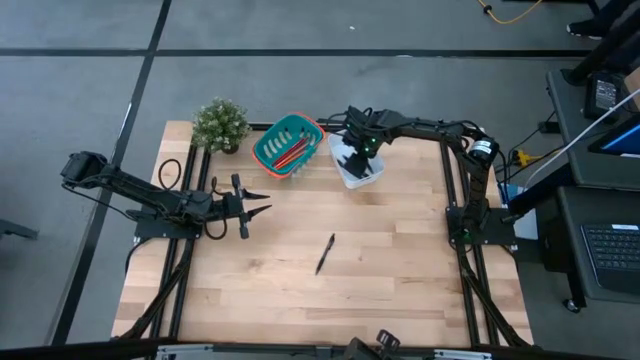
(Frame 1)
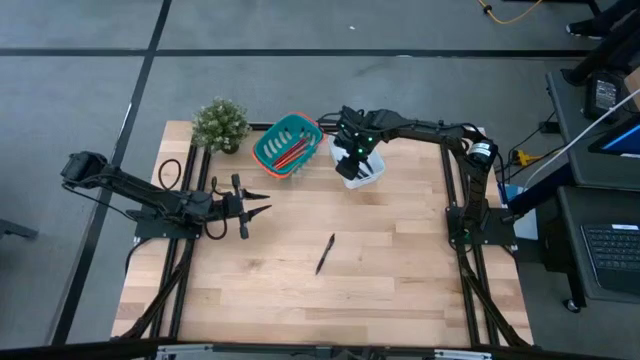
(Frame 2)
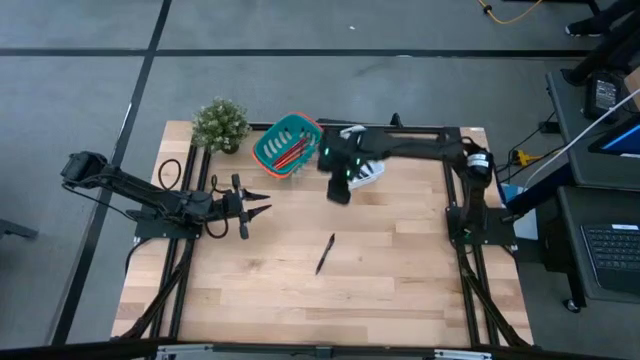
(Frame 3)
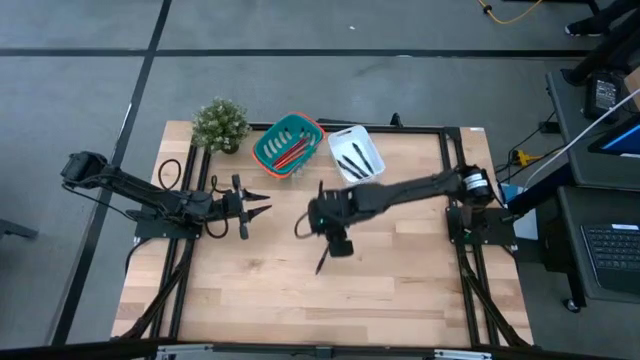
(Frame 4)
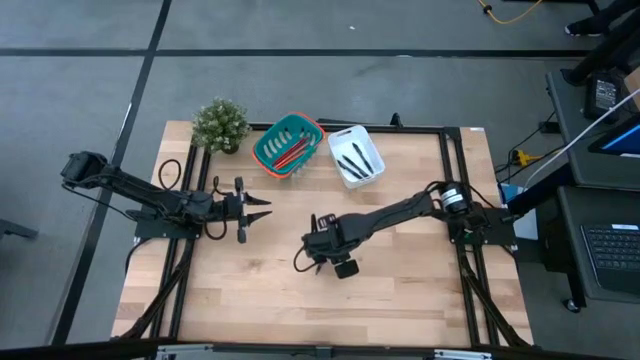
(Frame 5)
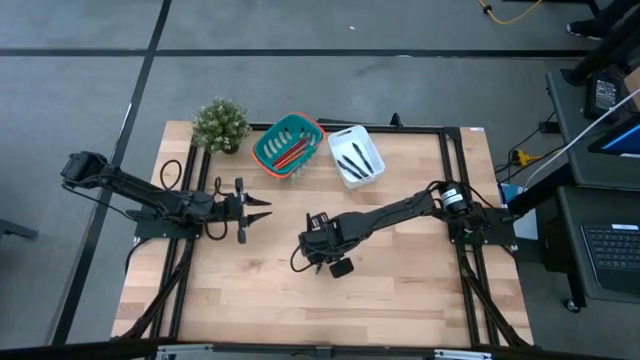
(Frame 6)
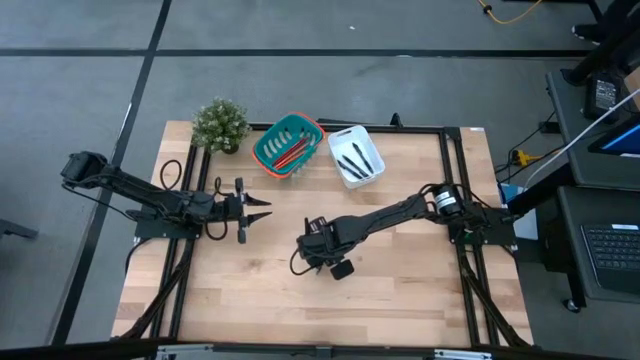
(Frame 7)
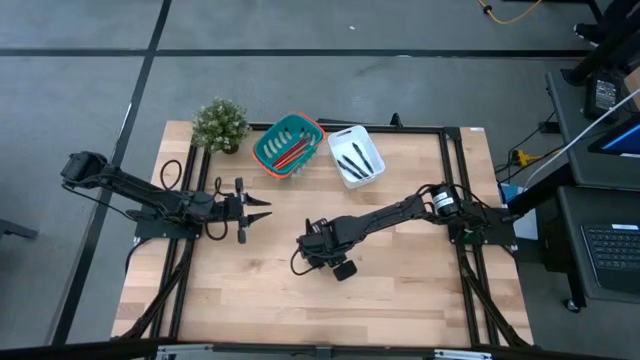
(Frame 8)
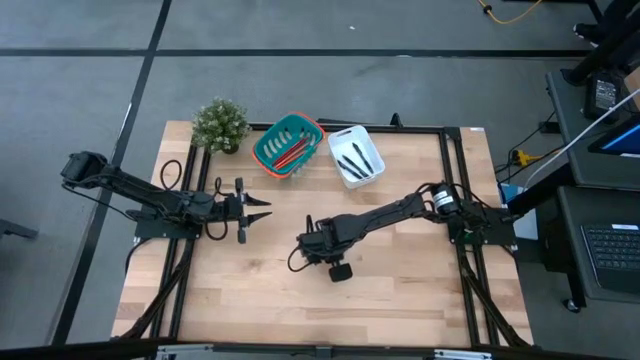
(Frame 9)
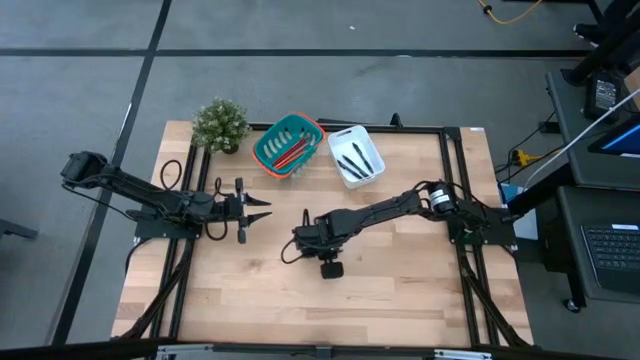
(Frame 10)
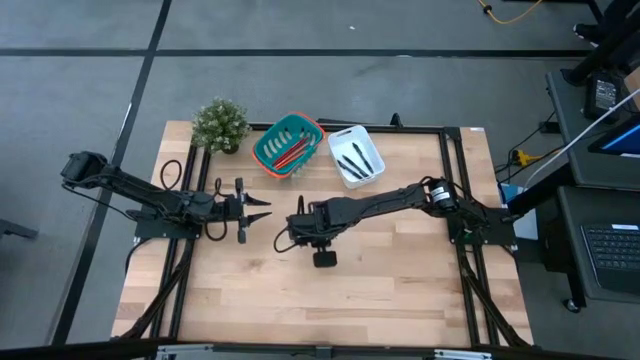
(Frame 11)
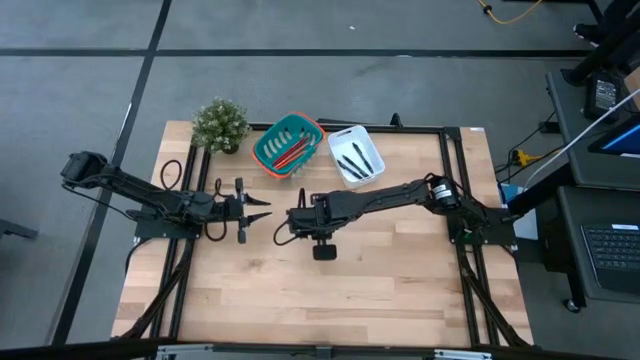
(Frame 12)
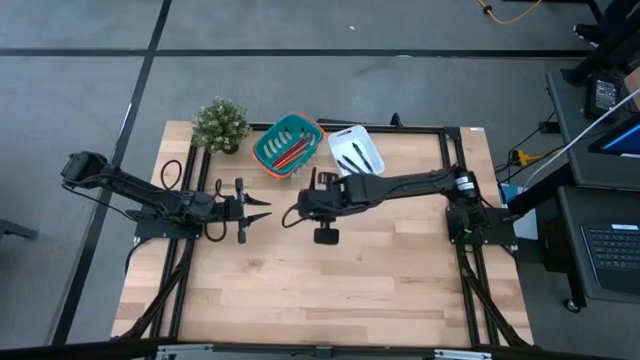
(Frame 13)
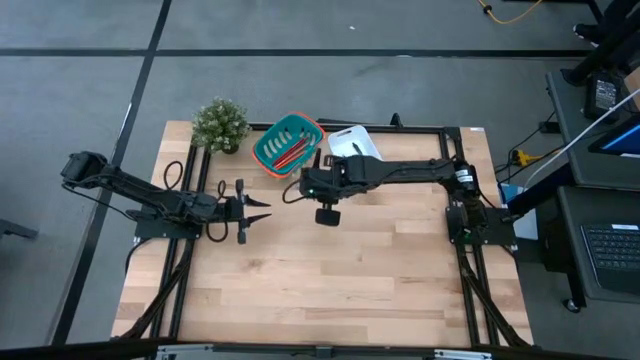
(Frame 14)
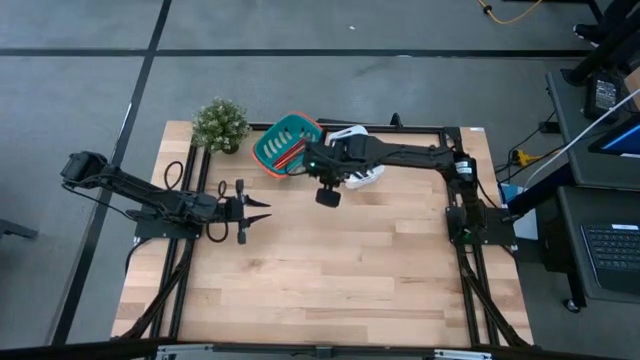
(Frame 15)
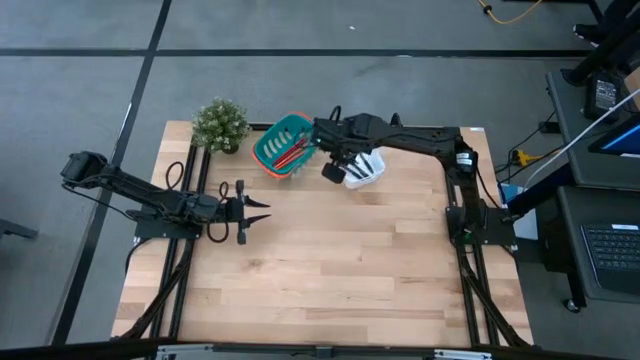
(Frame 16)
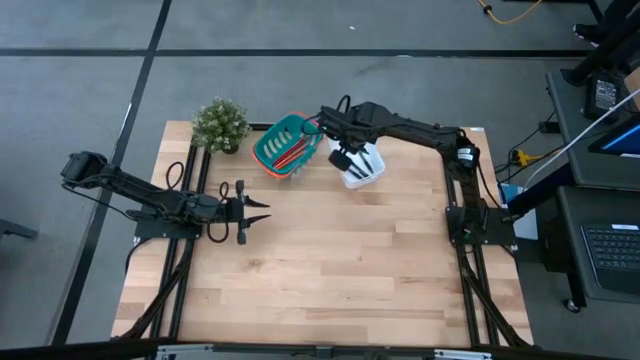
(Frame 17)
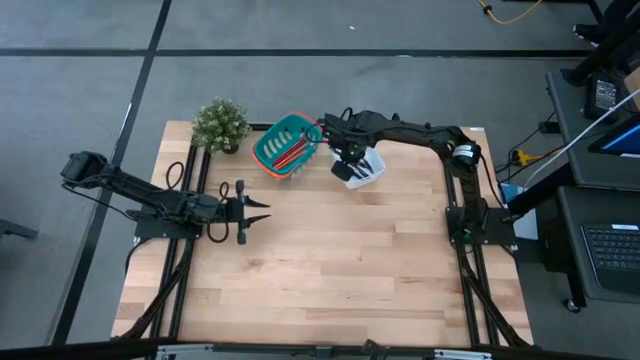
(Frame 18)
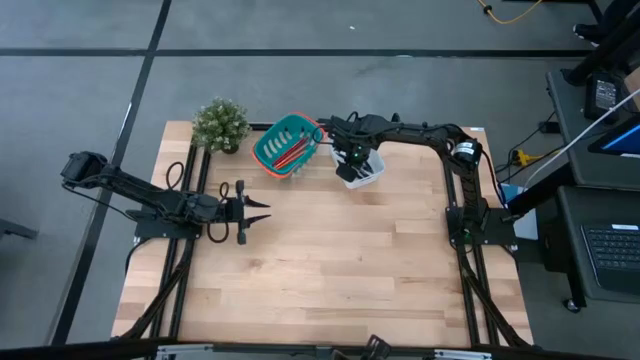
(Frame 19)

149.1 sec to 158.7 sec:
Task: Sort pens & pencils
Put the black pen into the white bin

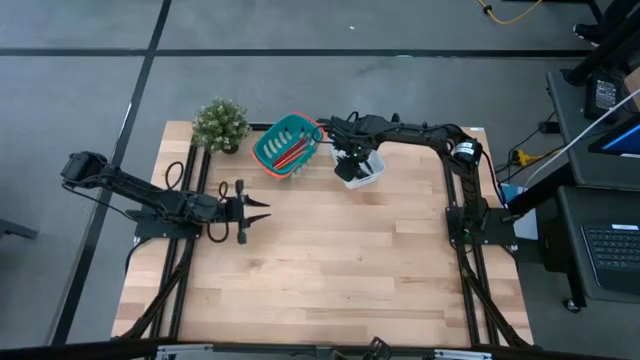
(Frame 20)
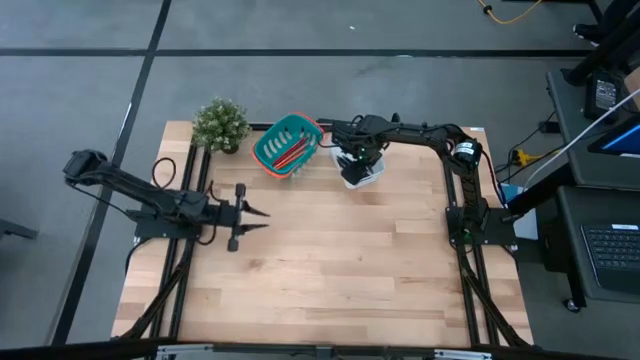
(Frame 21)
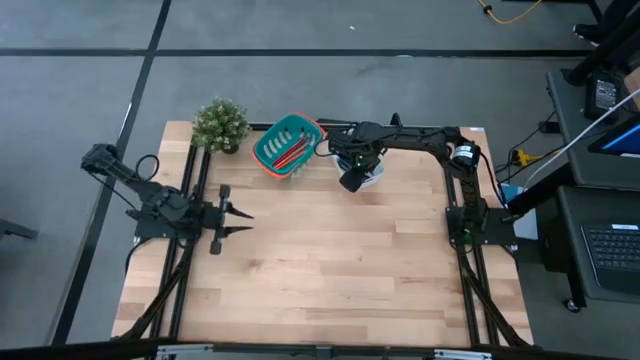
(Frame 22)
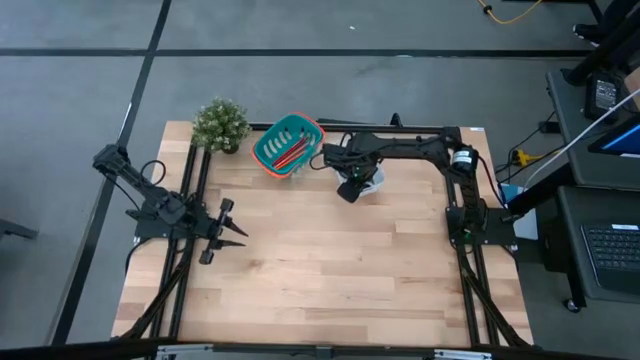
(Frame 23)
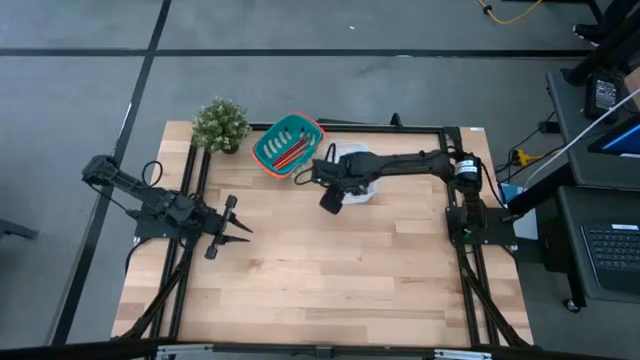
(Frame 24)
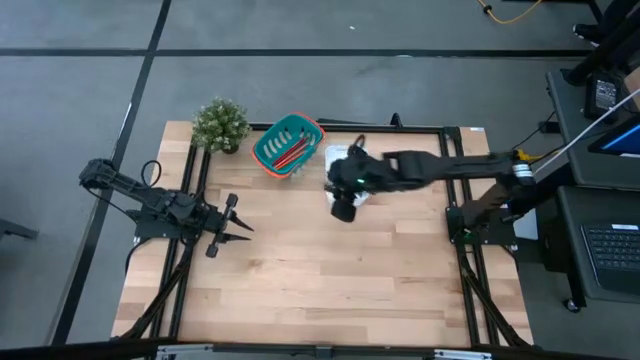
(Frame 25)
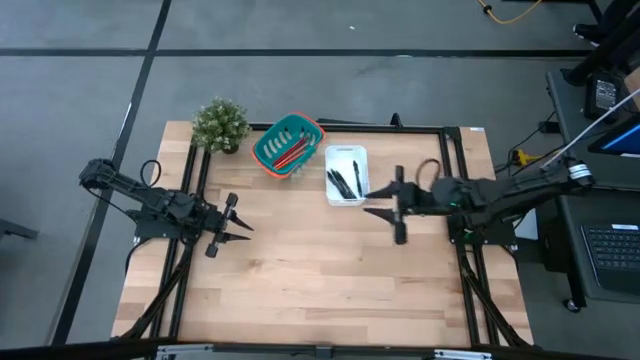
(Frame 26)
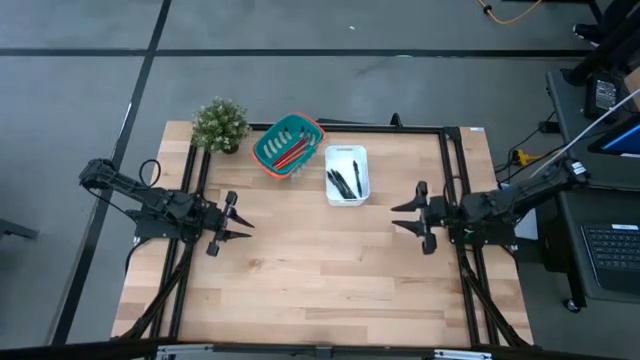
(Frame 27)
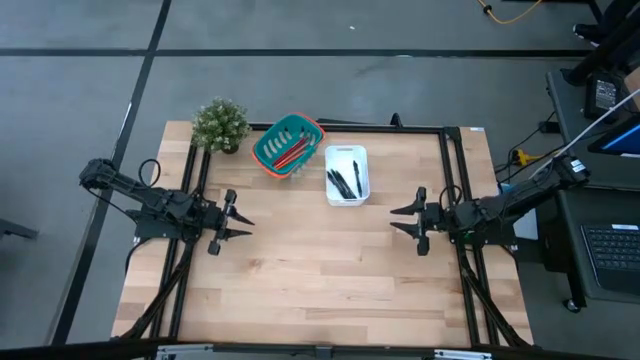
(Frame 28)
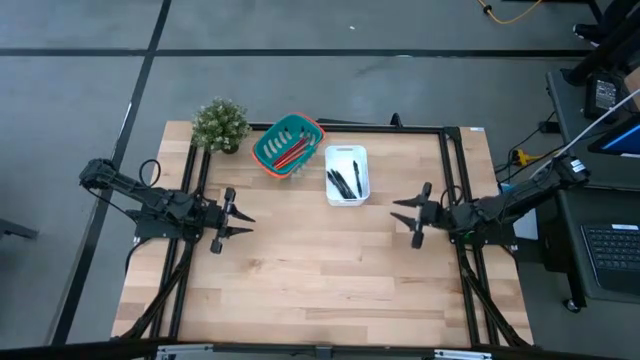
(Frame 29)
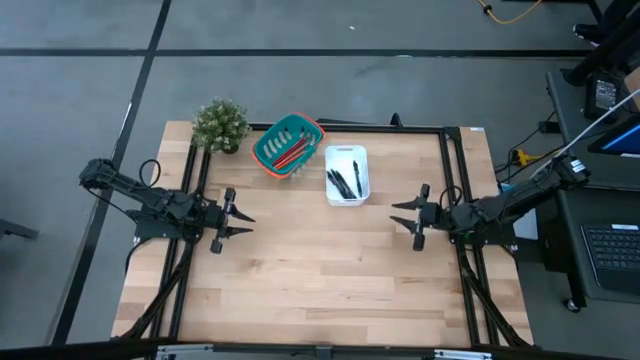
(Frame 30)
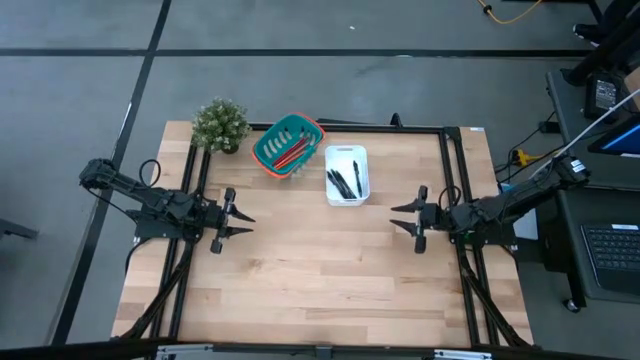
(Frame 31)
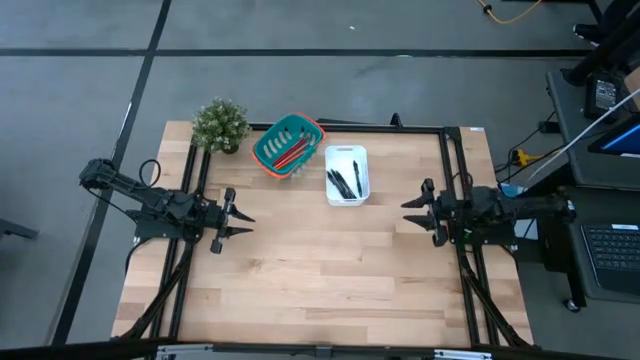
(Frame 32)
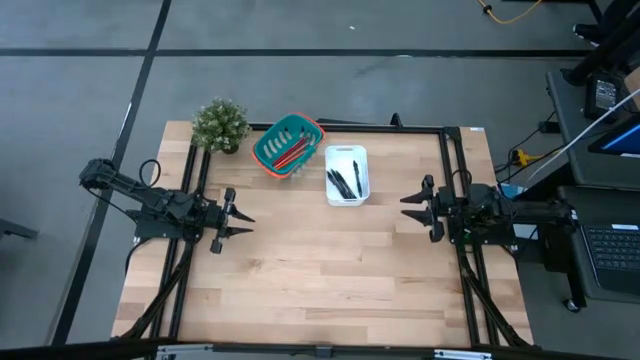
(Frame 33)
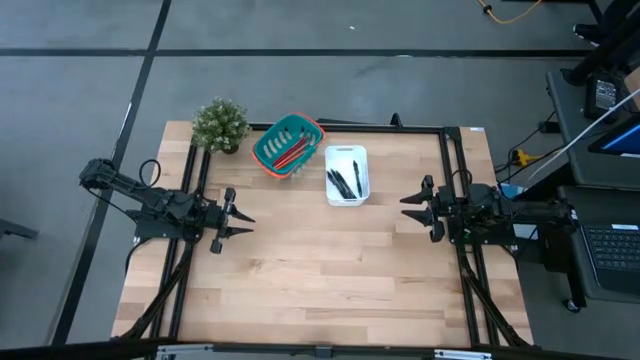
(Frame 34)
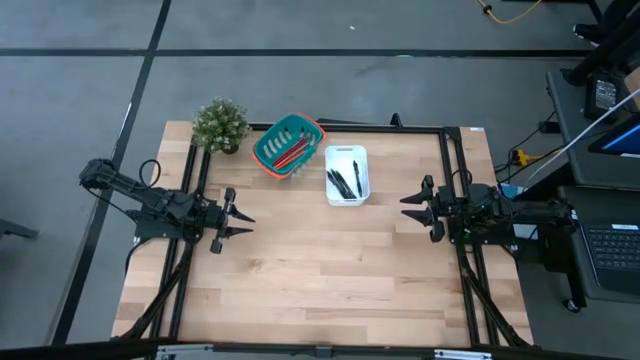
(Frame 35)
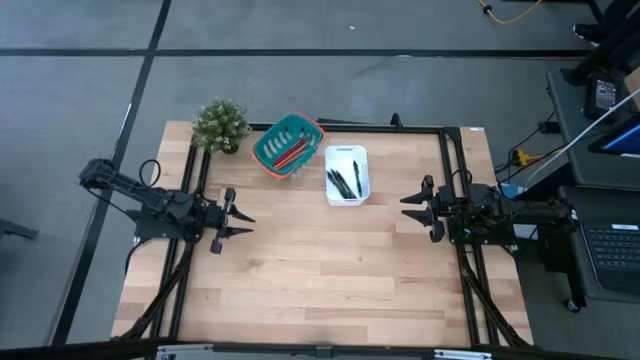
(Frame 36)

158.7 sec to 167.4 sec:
Return to Home Position

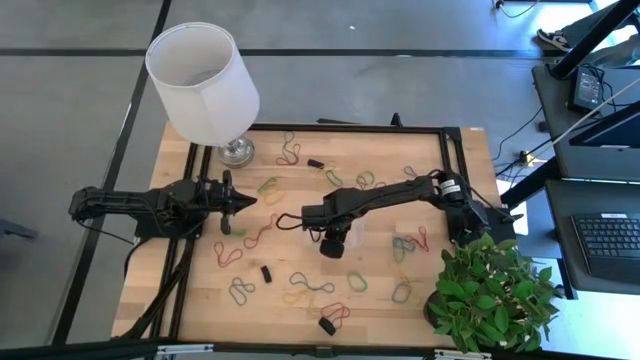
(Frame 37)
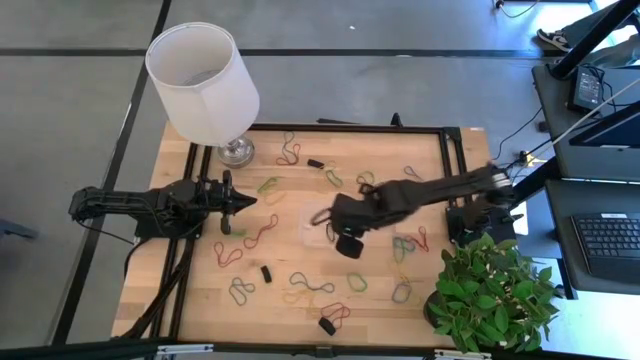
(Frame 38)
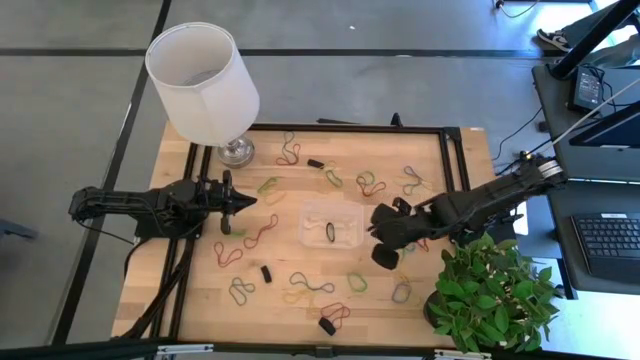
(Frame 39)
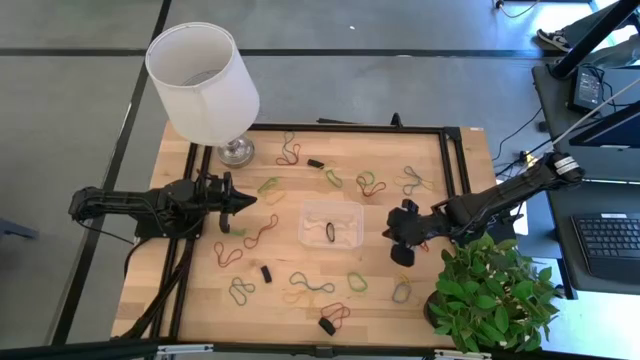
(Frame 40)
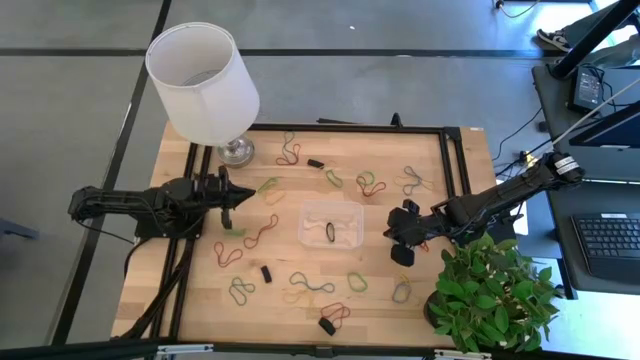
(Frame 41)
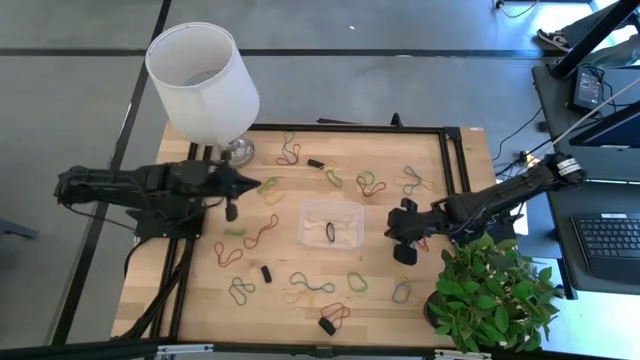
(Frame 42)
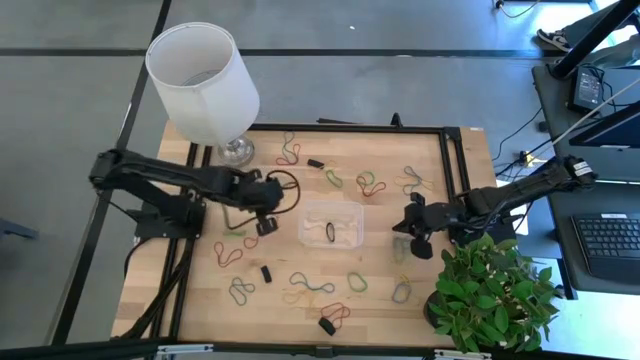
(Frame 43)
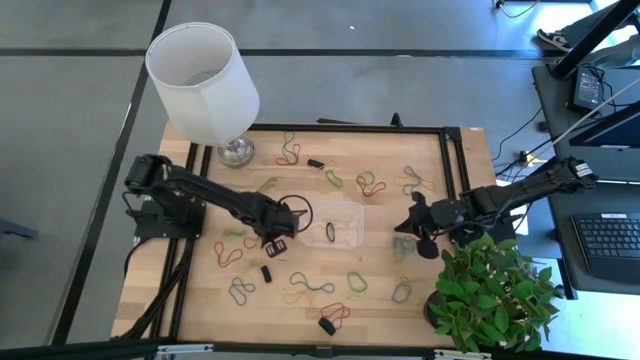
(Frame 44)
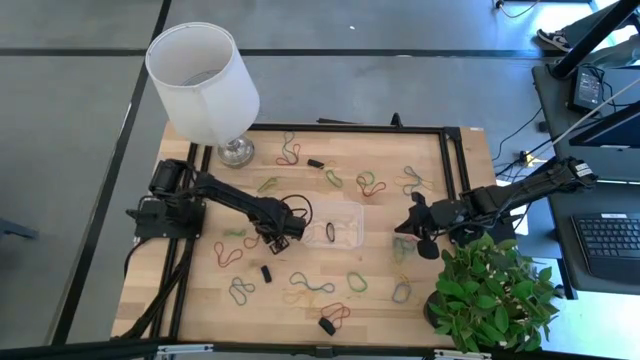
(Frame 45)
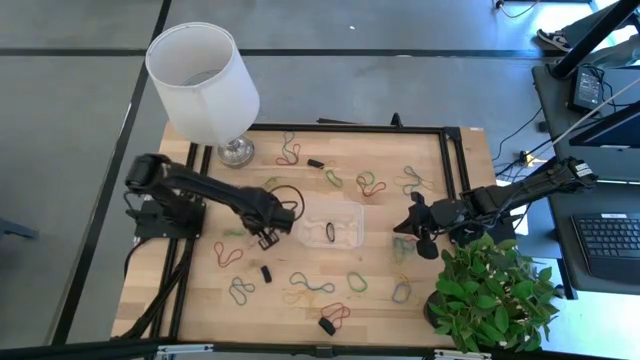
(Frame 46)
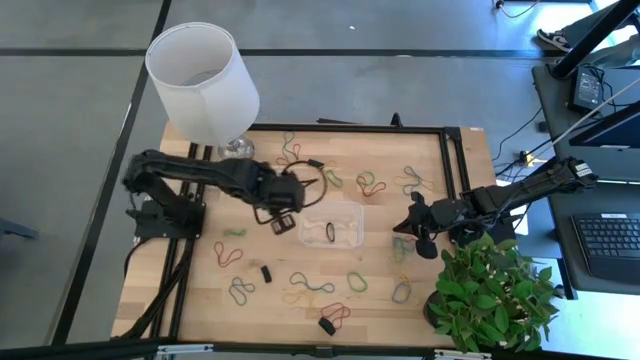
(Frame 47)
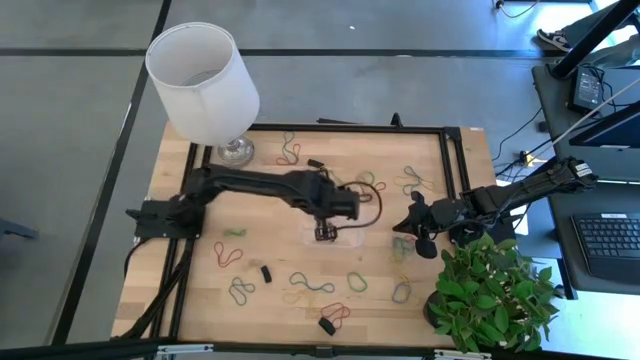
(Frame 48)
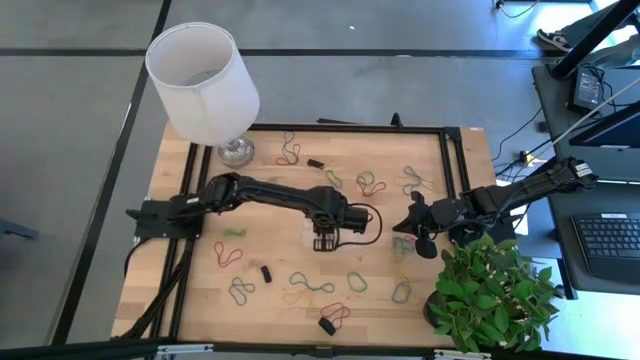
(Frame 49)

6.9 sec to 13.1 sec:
Task: Pick and place rubber bands into bin
Put the red rubber band into the transparent bin
